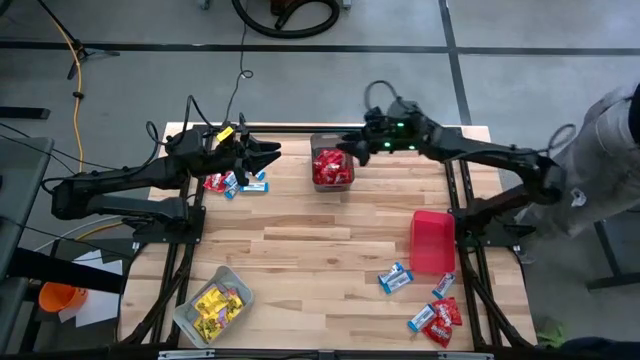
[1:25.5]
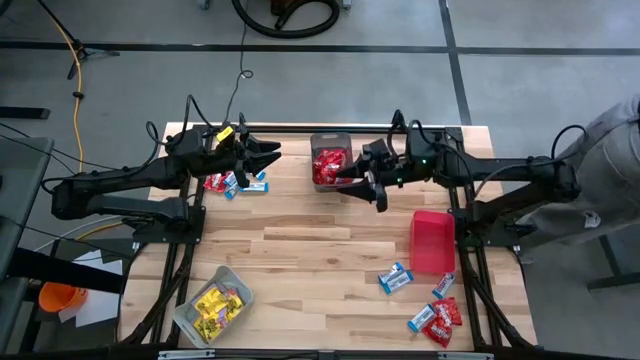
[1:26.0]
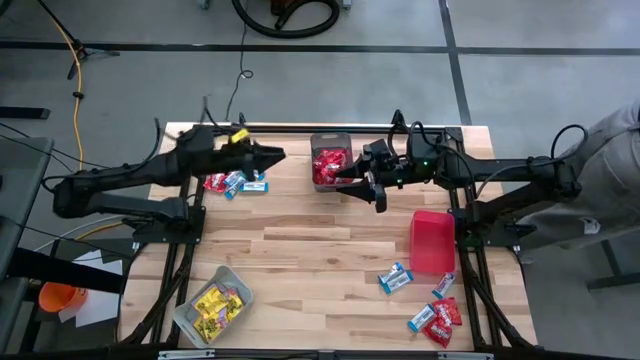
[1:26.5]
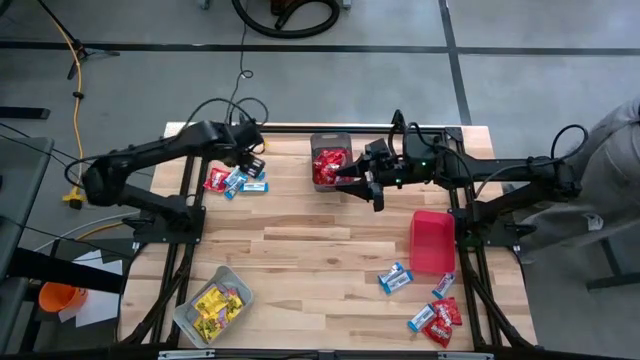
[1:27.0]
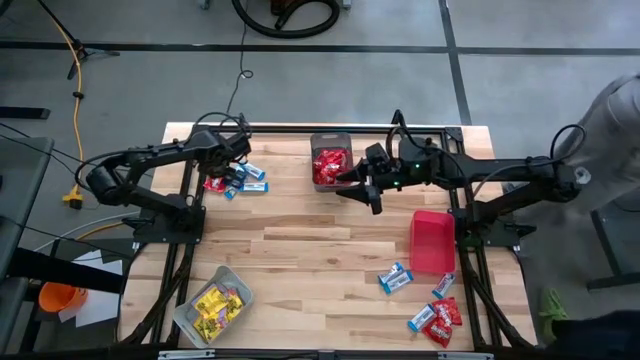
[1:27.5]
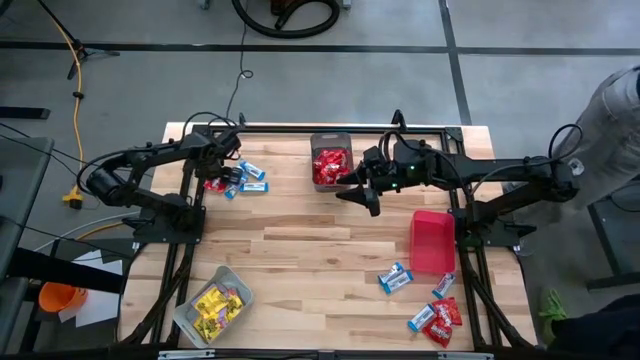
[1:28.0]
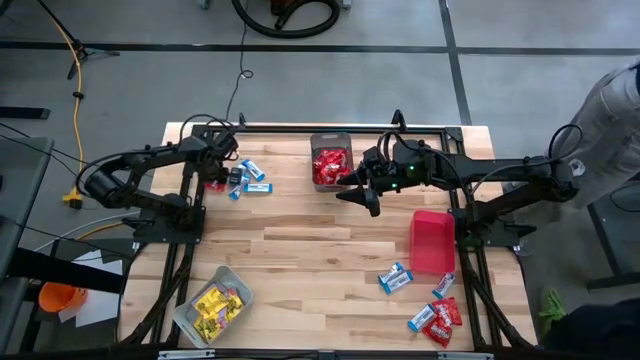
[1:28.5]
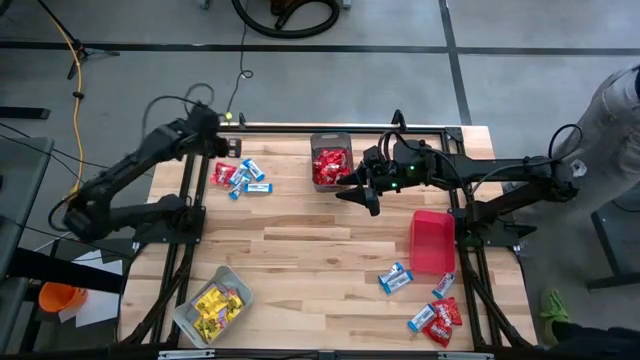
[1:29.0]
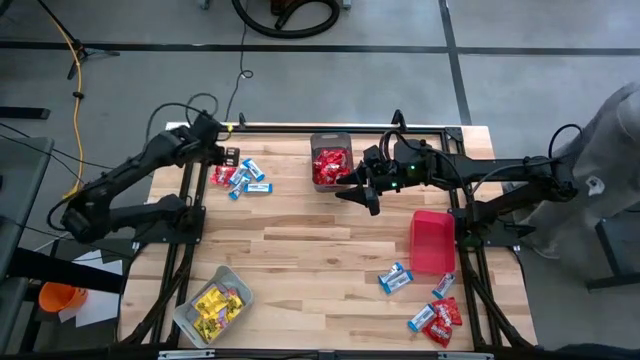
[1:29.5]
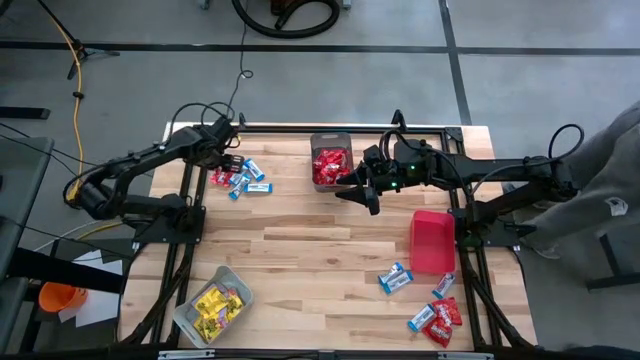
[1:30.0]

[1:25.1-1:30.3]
Task: Sort candy
Put the red candy pack into the black bin

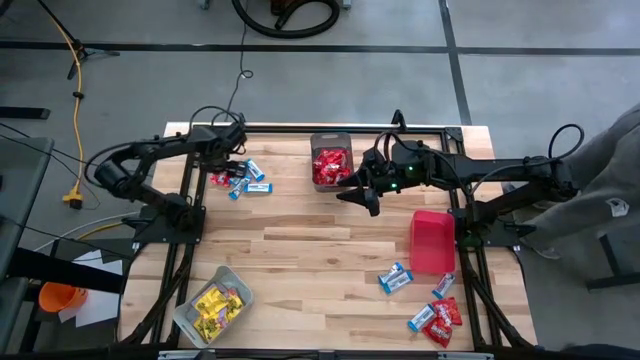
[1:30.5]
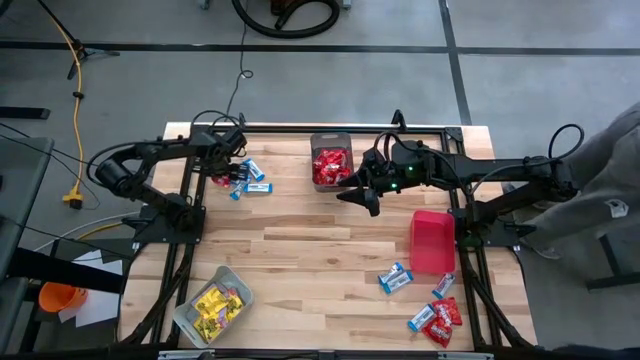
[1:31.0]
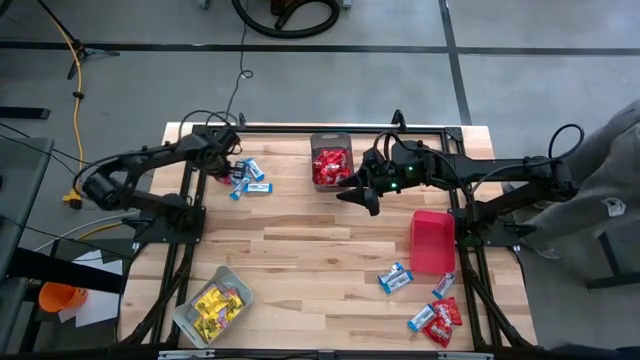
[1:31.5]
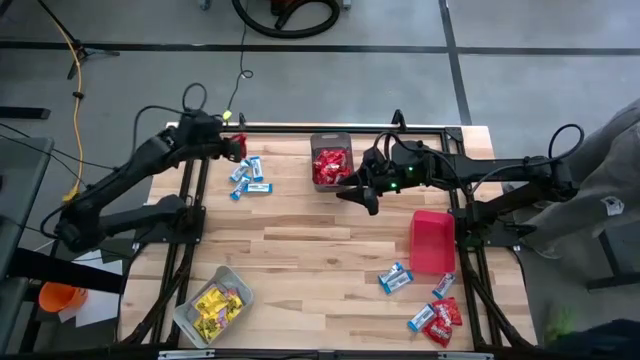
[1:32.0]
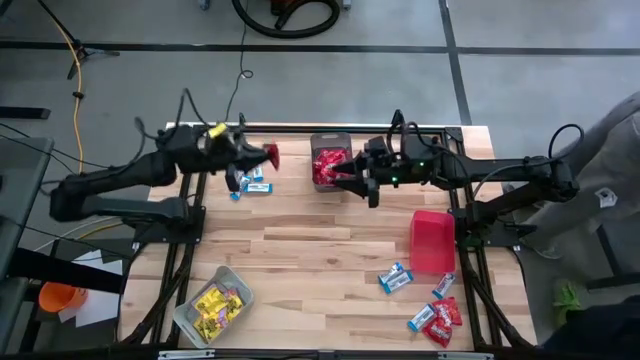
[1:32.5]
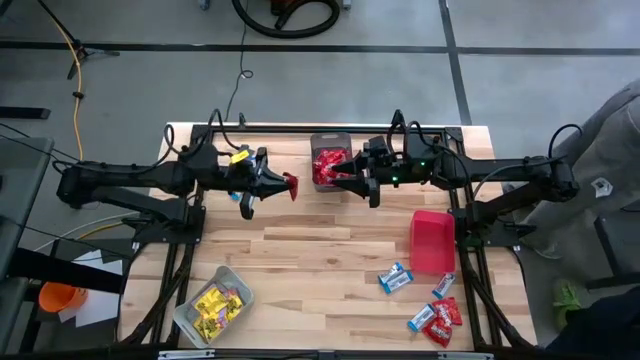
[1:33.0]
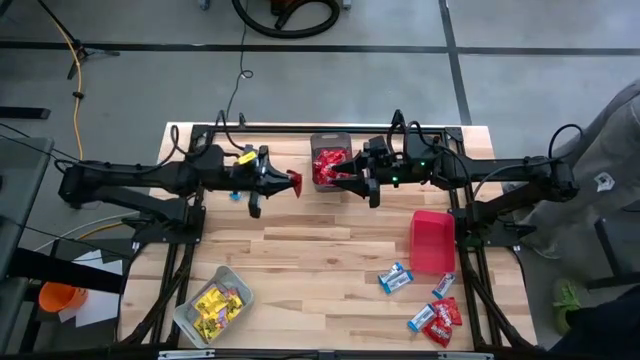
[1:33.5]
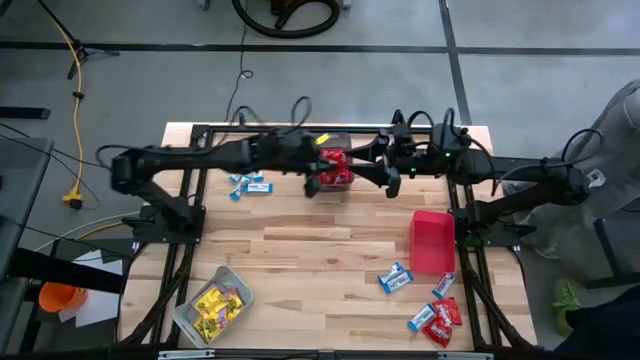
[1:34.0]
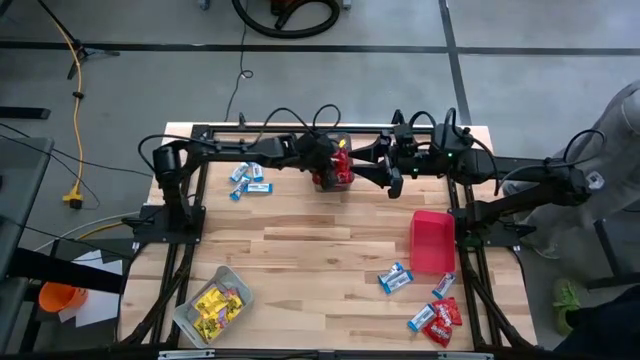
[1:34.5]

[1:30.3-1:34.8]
Put the red candy pack into the black bin

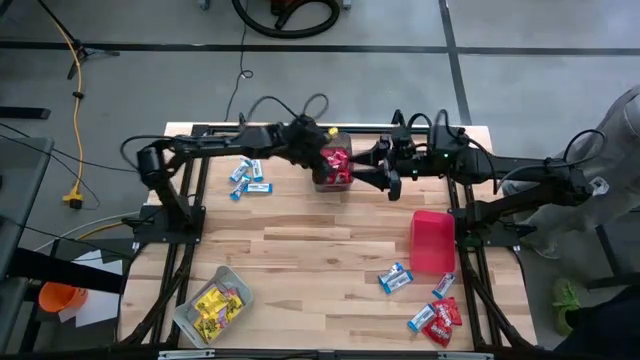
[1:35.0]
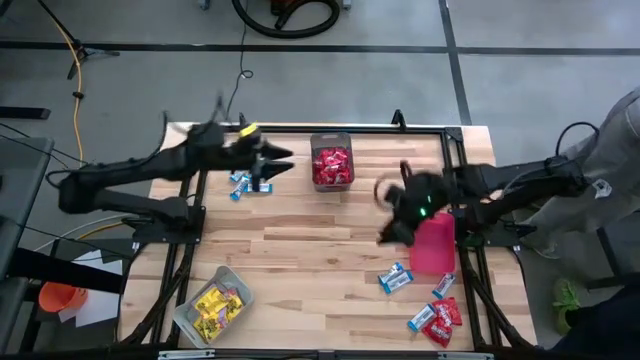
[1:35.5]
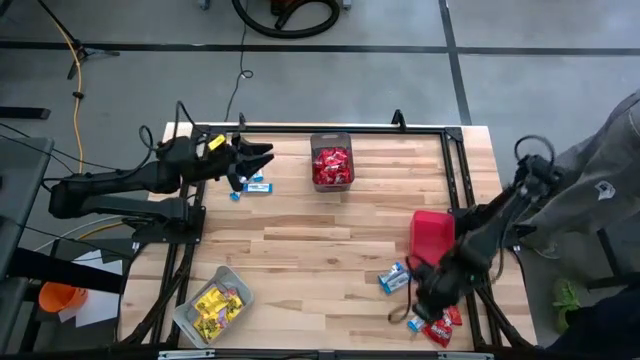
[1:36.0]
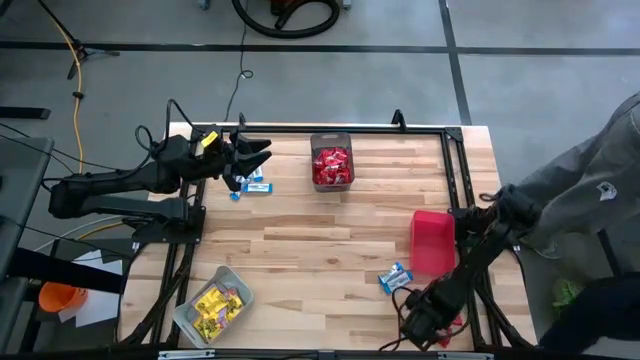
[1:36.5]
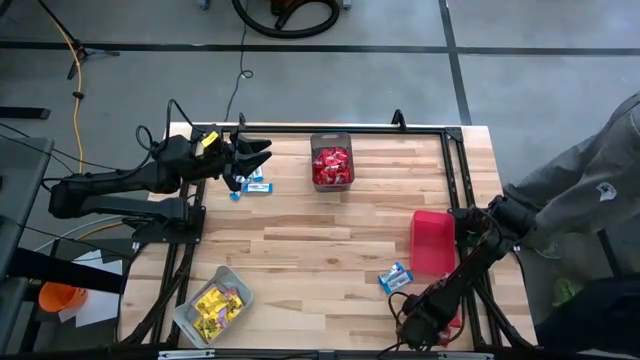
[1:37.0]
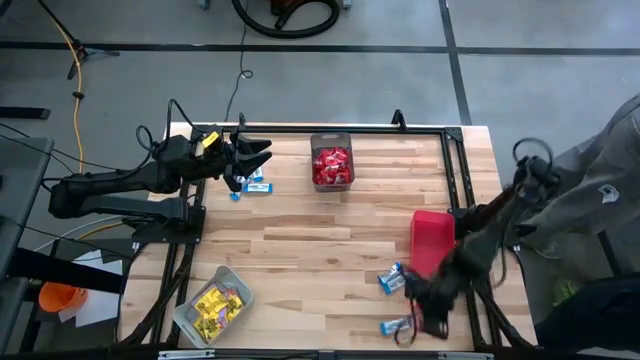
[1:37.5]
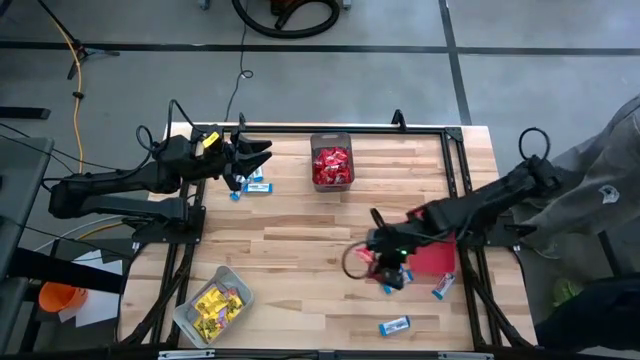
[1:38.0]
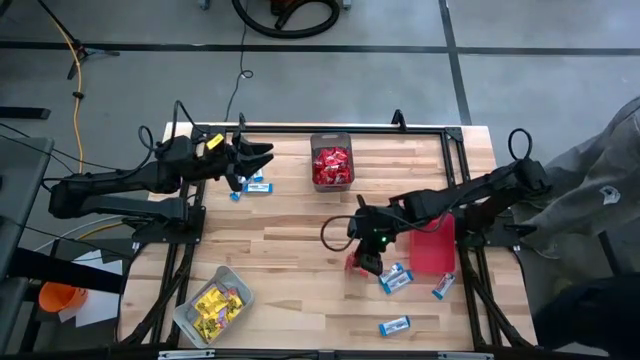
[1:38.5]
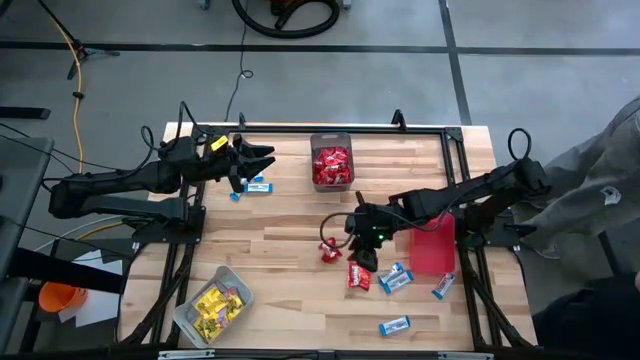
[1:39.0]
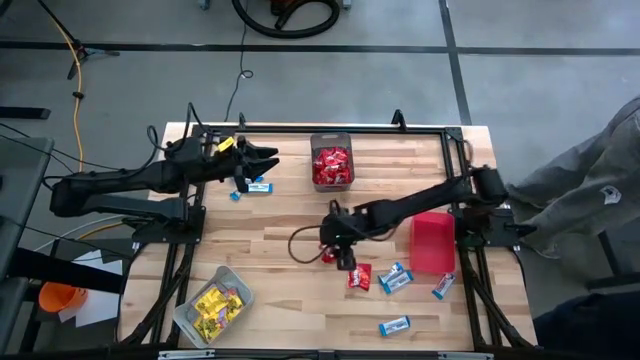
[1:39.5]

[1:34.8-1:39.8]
Put the red candy pack into the black bin

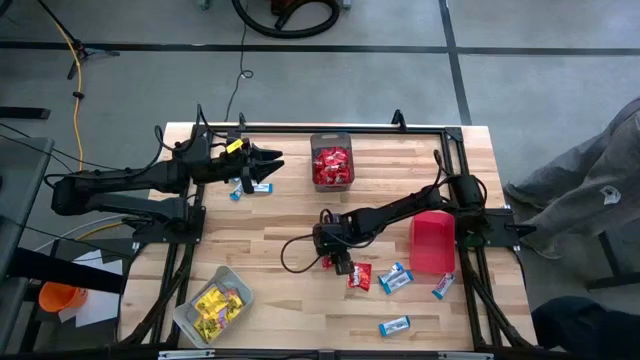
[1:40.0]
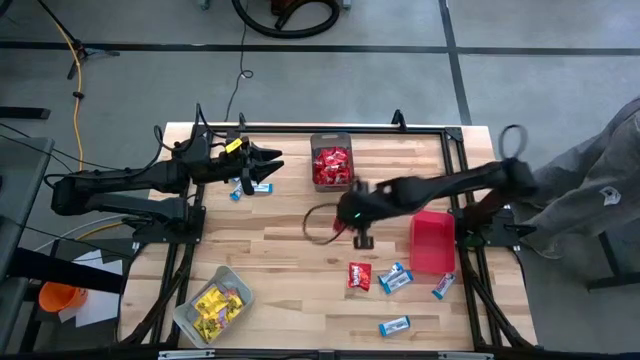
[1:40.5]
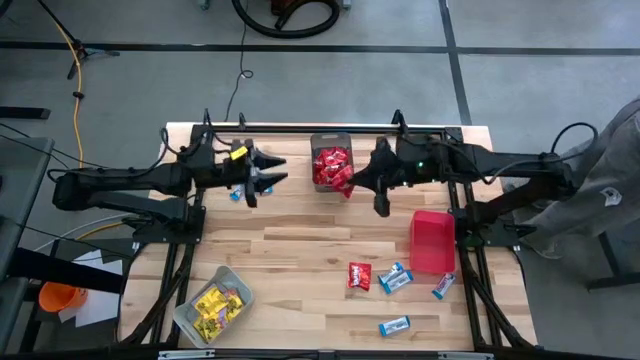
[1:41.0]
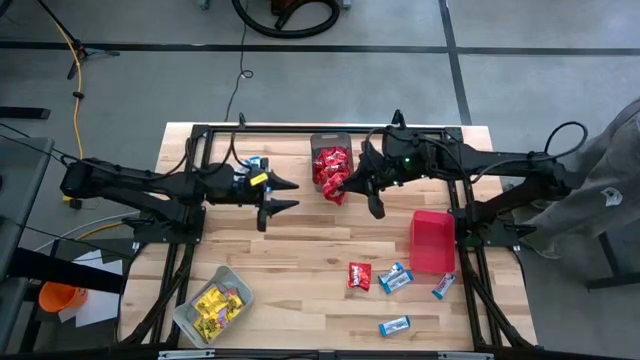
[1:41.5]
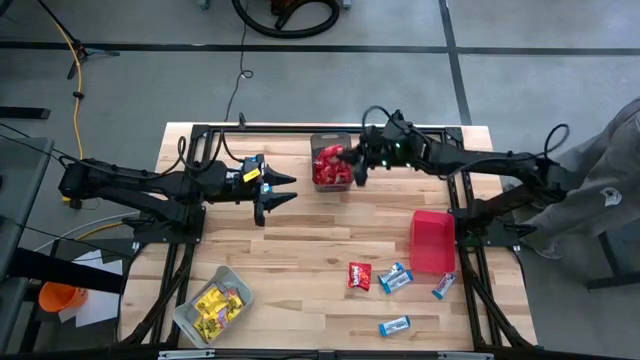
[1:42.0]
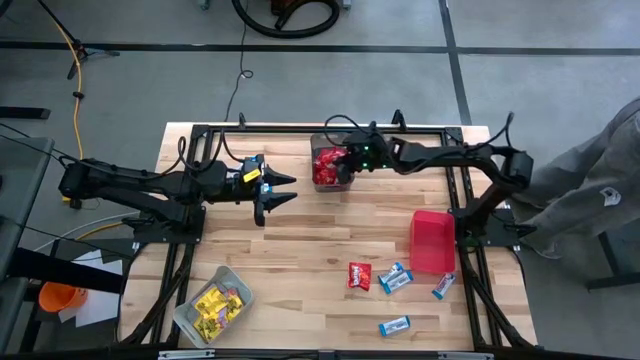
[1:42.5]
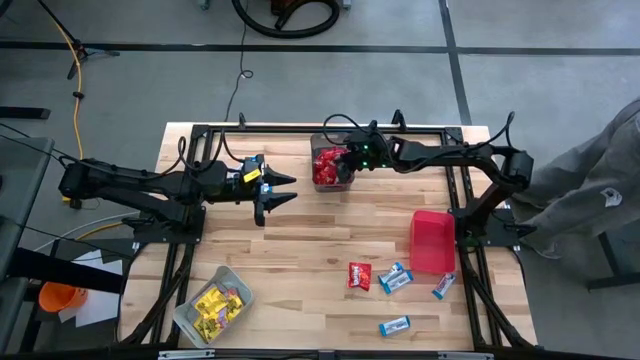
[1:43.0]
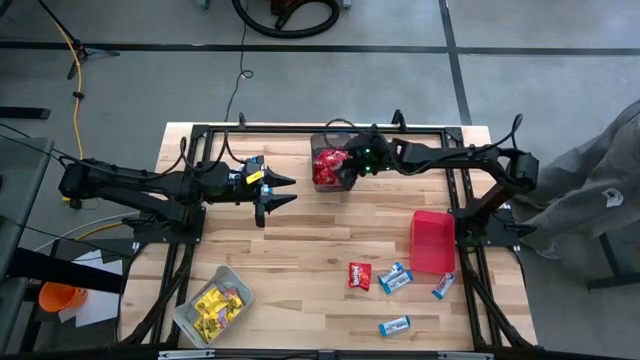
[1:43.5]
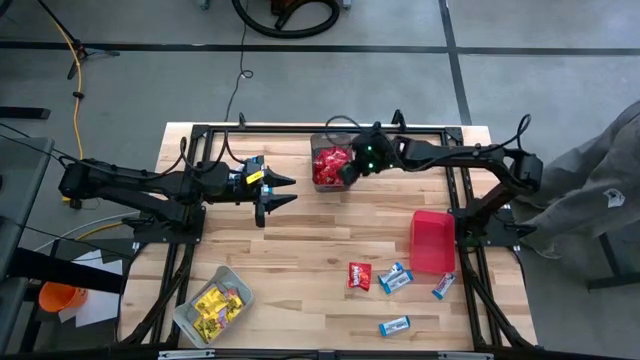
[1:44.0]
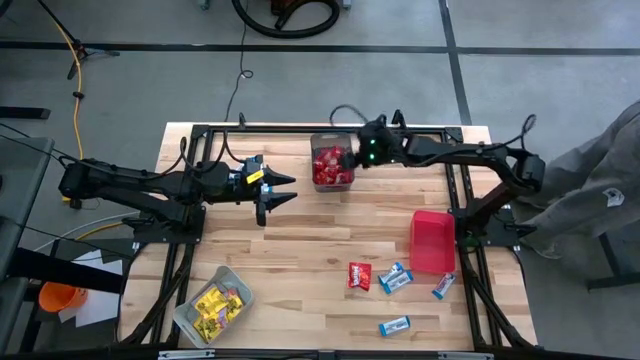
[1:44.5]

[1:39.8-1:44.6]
Put the red candy pack into the black bin

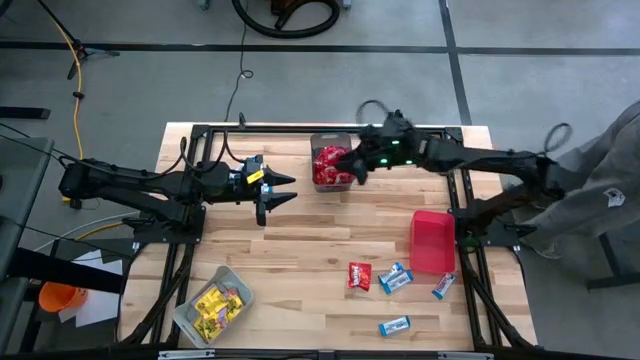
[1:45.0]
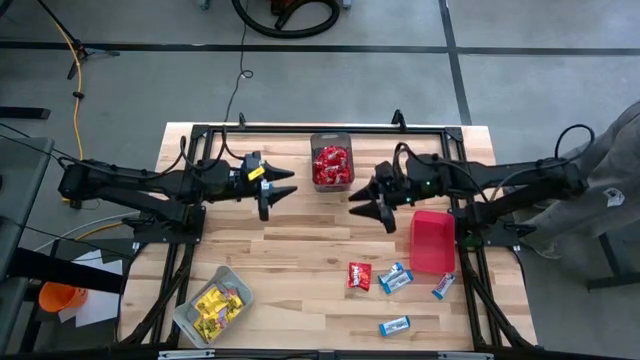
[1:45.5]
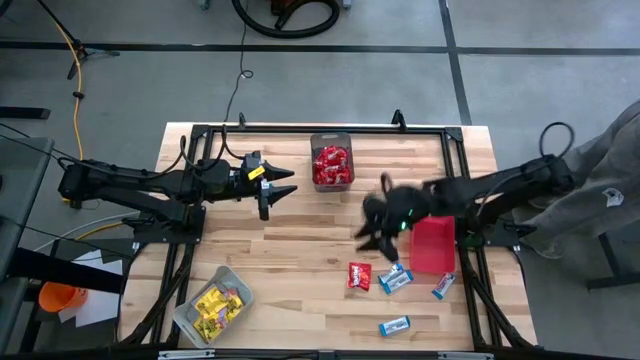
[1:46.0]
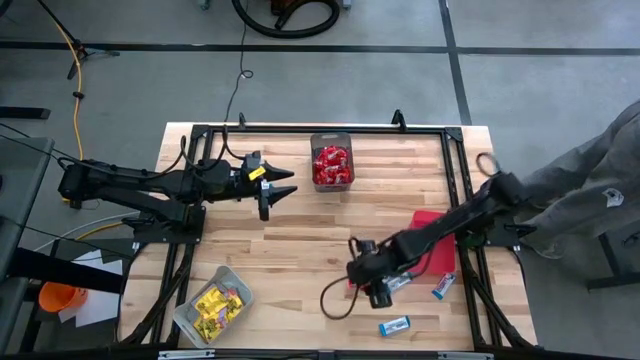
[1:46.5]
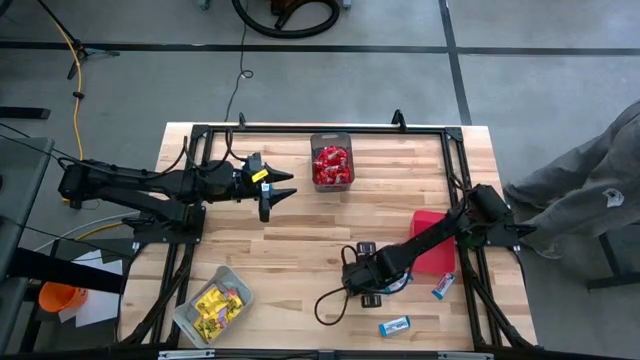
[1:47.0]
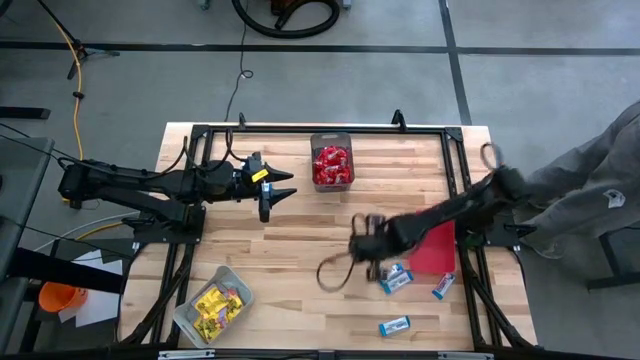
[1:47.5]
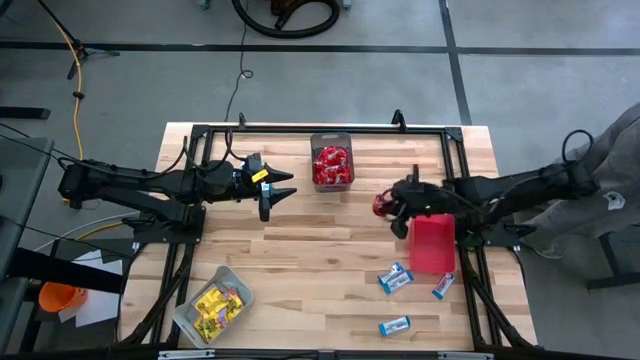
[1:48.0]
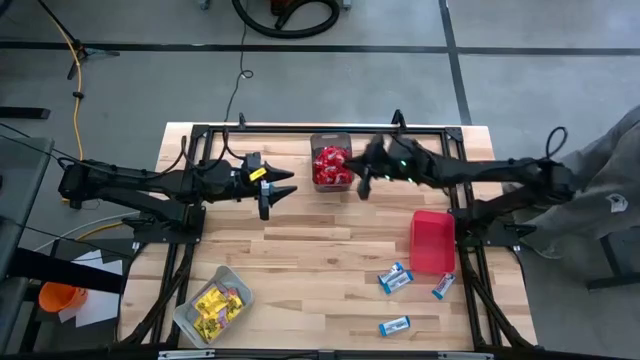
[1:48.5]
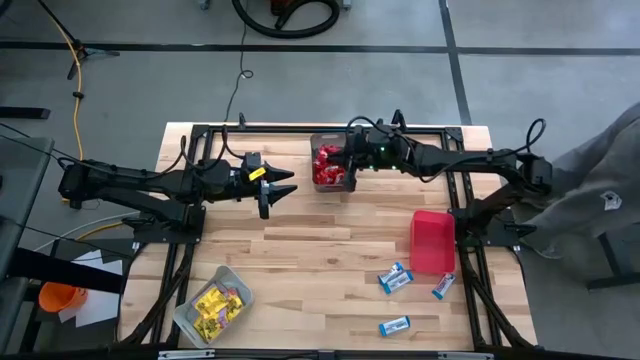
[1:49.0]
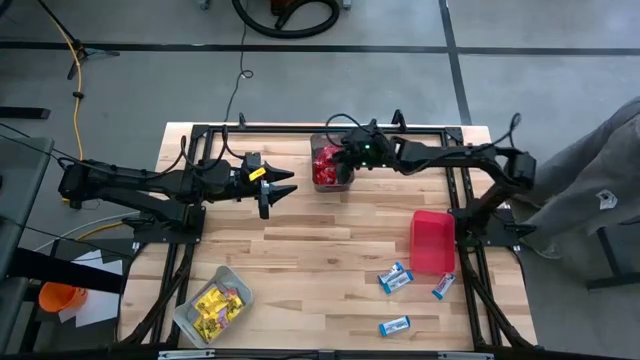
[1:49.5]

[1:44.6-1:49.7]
Put the red candy pack into the black bin
